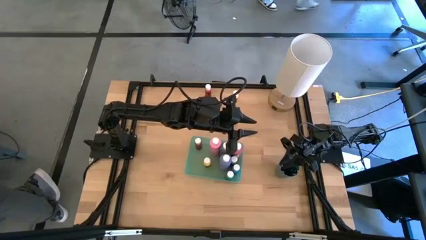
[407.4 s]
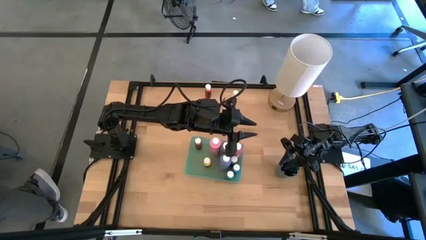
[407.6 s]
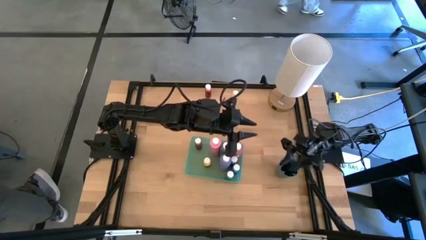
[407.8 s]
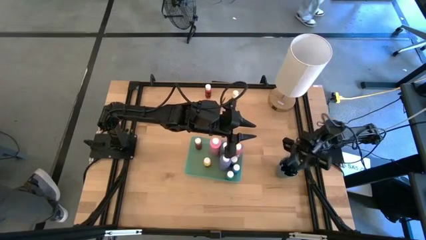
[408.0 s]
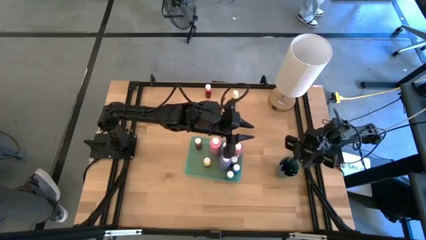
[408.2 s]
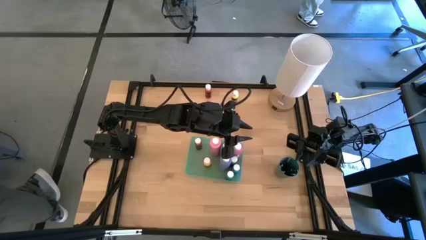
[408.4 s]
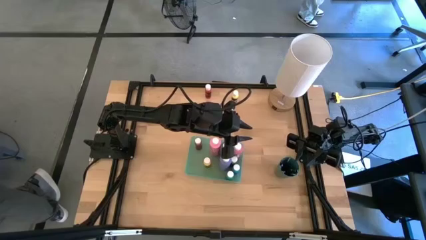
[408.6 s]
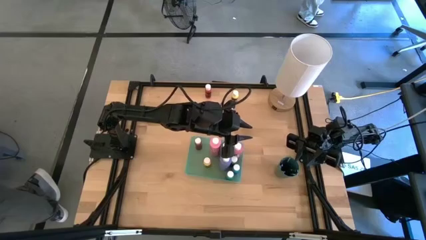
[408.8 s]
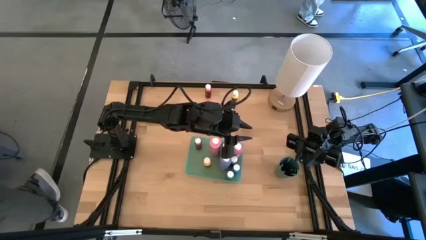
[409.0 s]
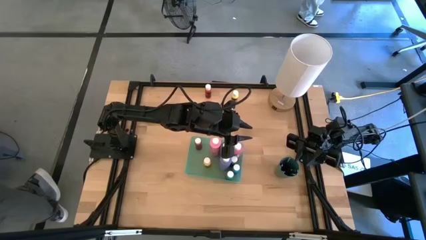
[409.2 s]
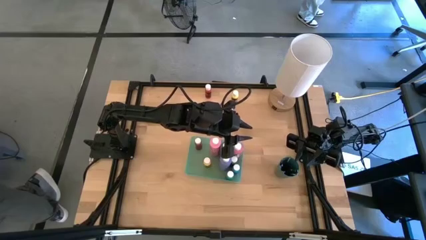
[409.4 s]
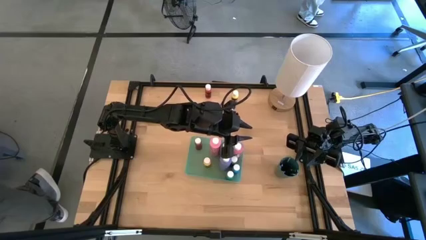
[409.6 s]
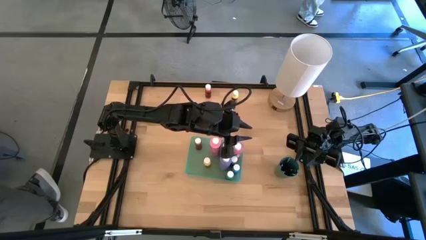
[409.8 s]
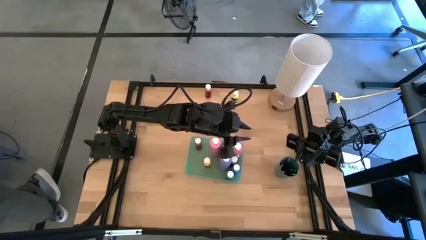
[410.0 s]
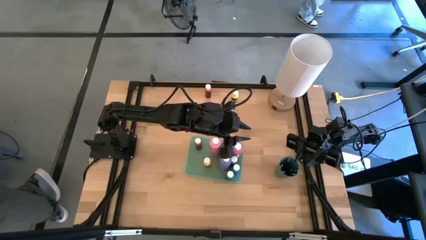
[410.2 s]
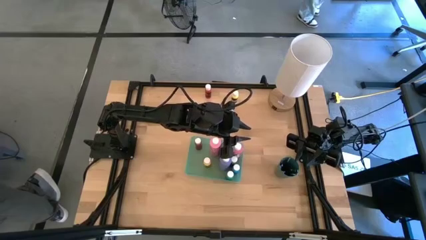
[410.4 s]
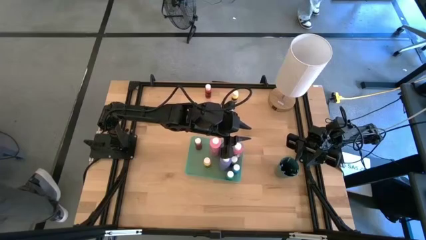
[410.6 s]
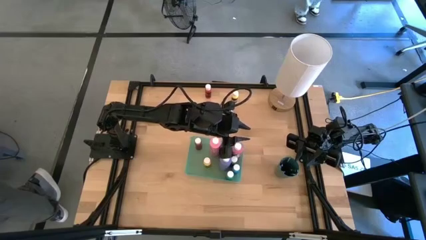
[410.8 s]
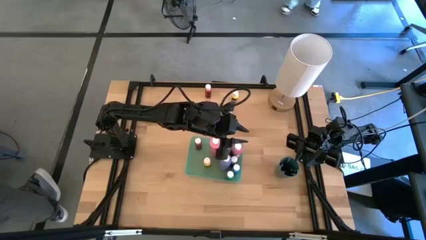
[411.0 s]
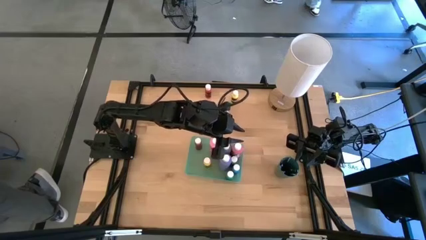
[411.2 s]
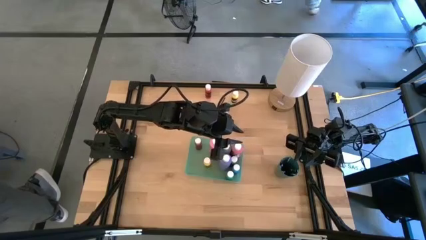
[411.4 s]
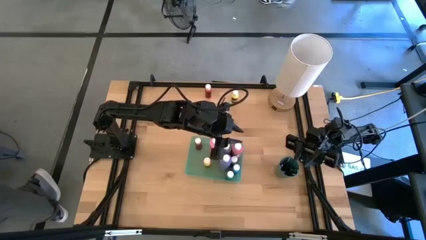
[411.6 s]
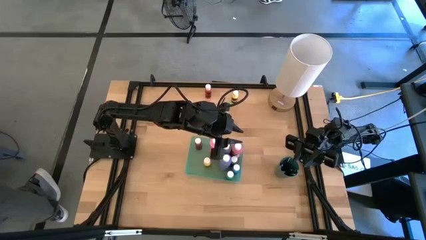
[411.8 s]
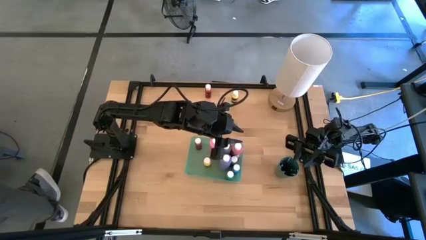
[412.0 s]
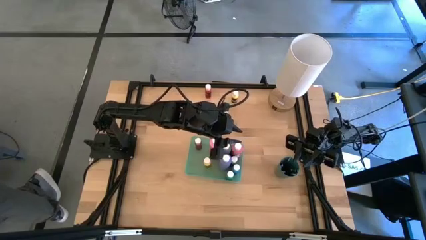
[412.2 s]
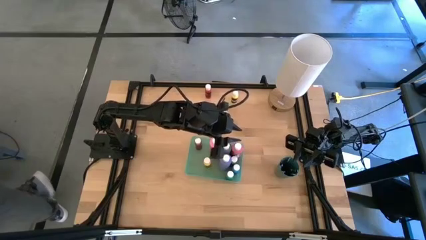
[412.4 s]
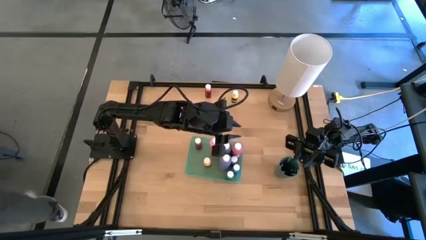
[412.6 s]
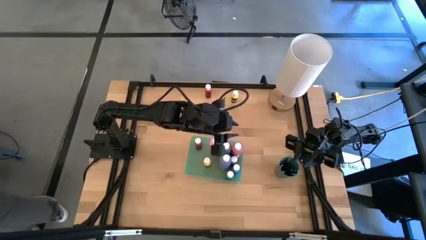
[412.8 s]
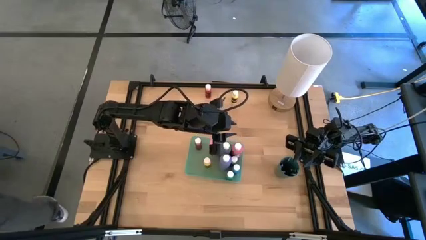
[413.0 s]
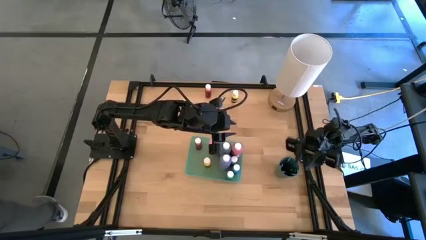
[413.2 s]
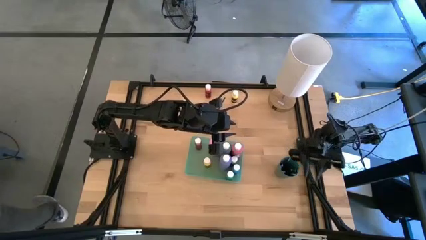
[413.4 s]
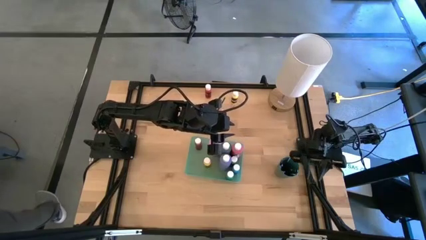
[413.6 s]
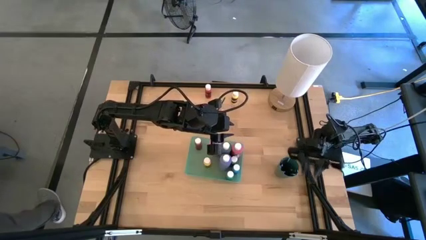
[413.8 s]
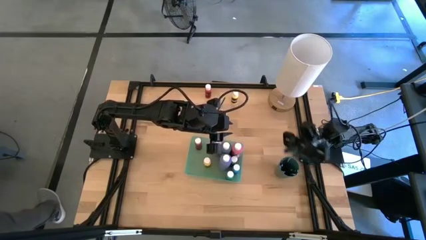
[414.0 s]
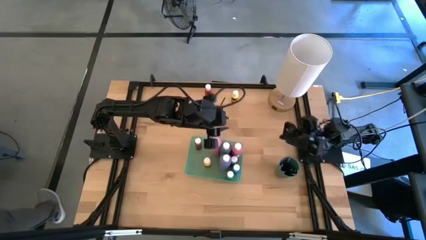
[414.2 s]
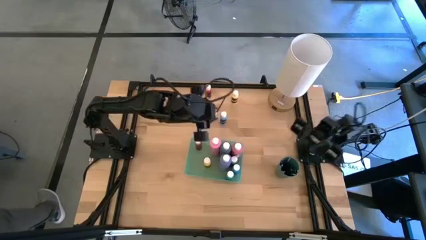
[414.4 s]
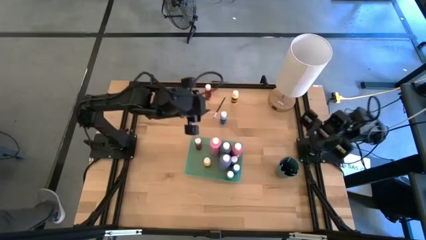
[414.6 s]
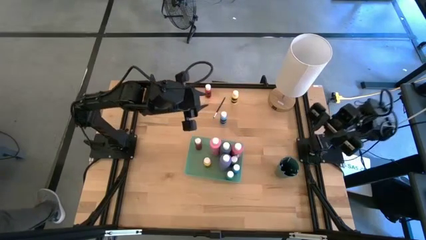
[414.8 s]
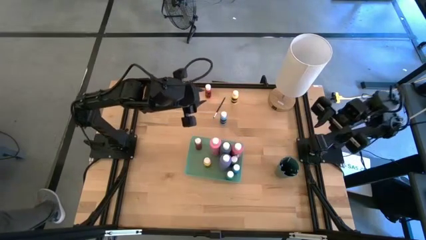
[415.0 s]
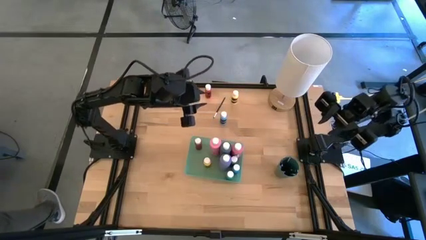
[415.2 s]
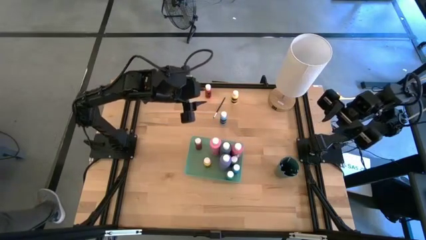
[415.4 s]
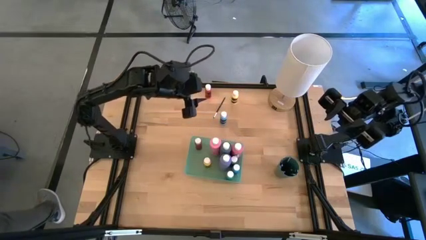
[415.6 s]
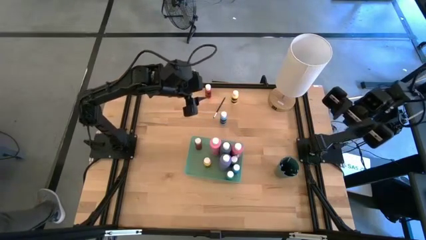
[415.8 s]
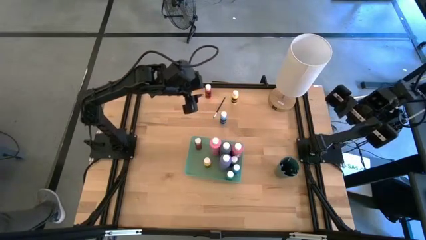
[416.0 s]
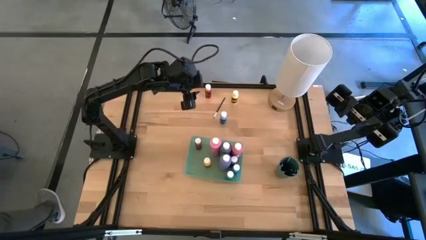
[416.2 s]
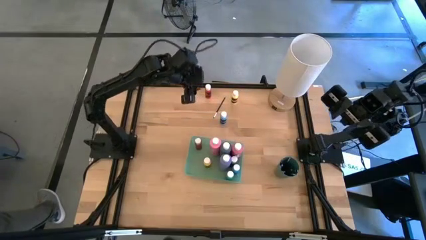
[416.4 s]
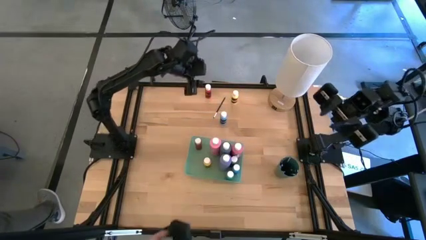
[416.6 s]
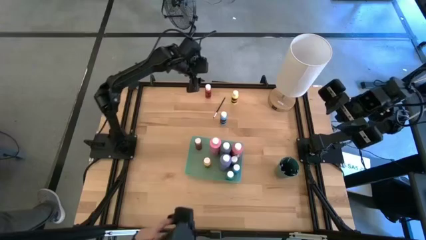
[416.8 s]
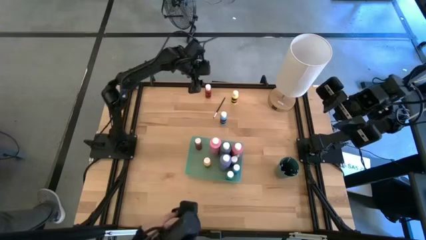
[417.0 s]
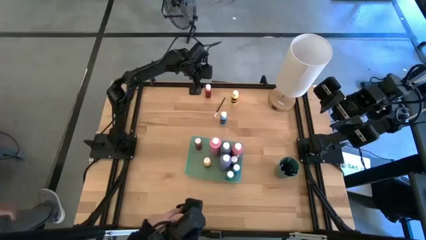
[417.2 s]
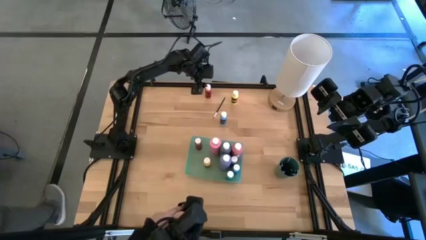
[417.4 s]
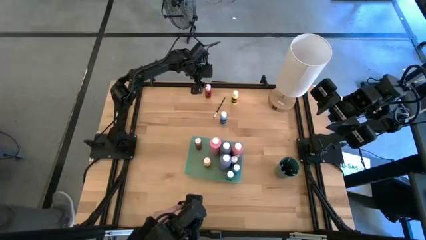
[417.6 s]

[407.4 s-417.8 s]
Task: Pick & Place Paint Supplies
Put the small red paint bottle into the light green bin
